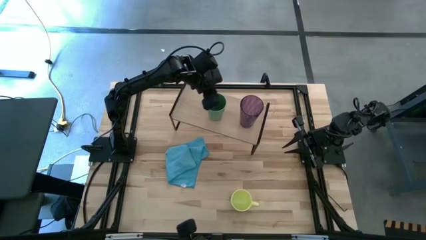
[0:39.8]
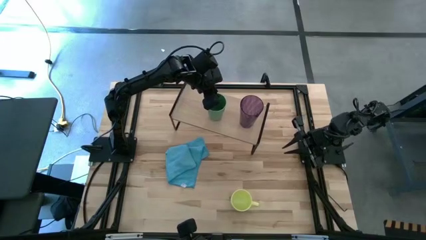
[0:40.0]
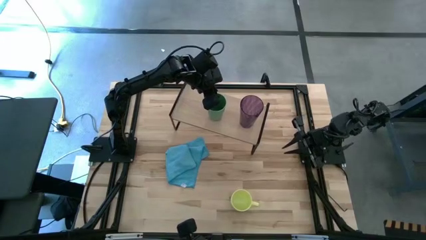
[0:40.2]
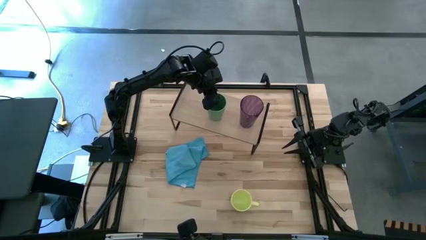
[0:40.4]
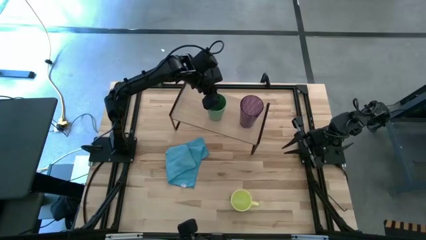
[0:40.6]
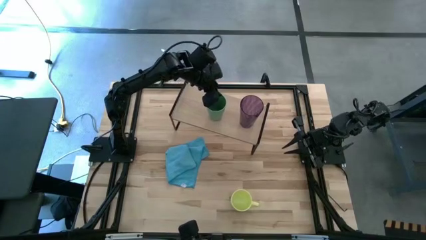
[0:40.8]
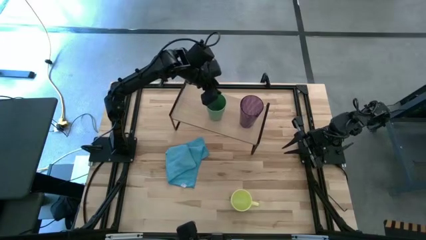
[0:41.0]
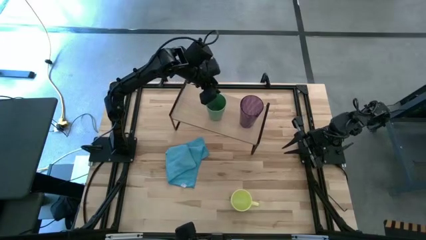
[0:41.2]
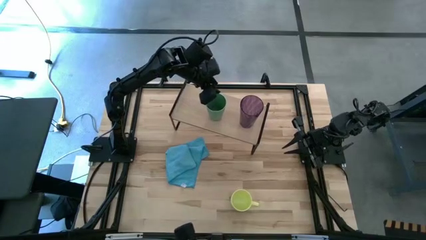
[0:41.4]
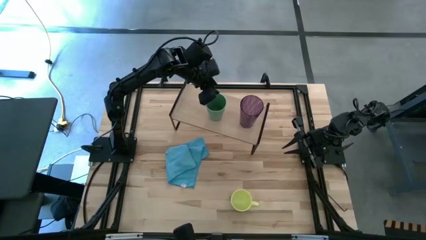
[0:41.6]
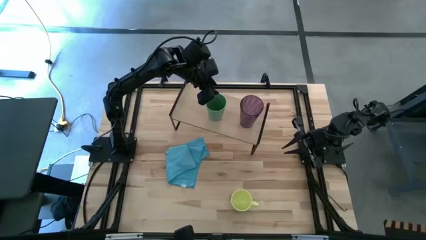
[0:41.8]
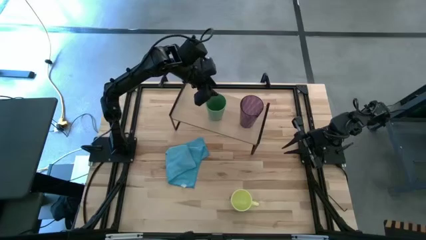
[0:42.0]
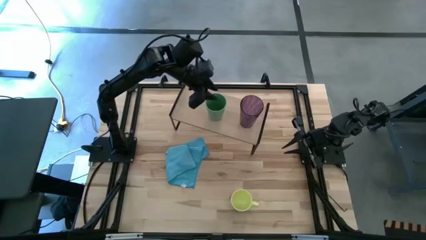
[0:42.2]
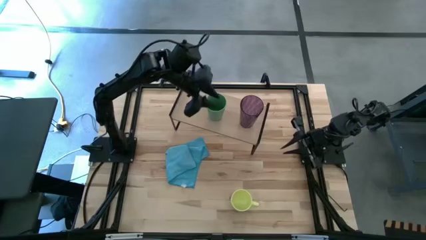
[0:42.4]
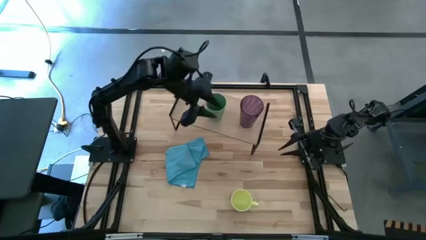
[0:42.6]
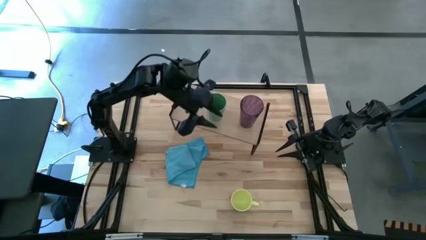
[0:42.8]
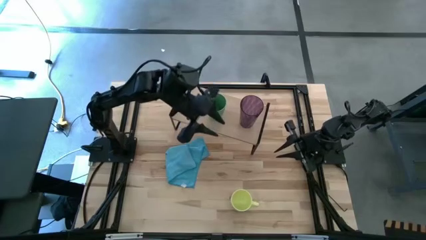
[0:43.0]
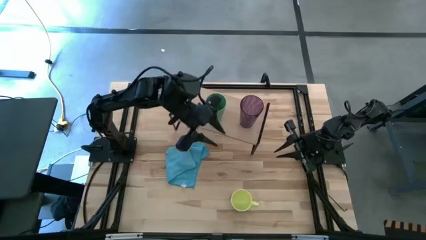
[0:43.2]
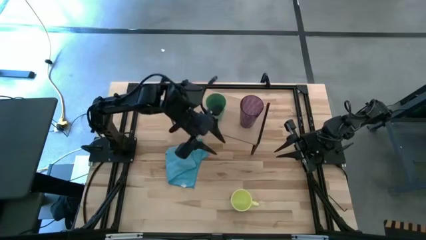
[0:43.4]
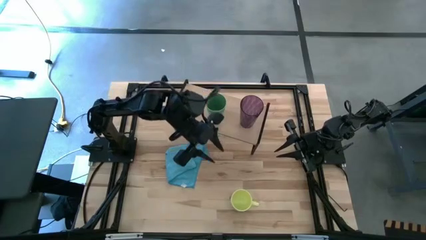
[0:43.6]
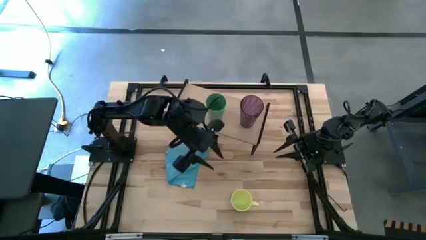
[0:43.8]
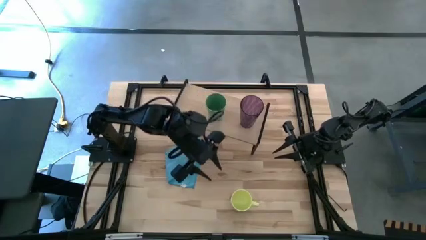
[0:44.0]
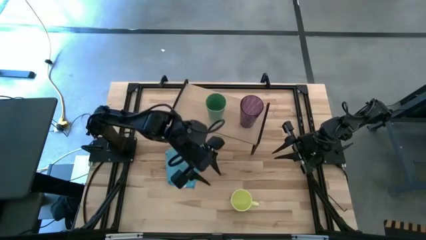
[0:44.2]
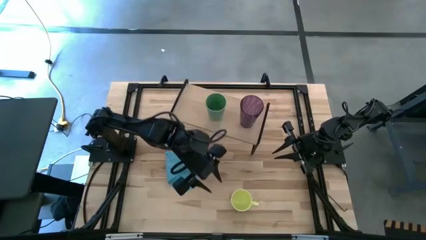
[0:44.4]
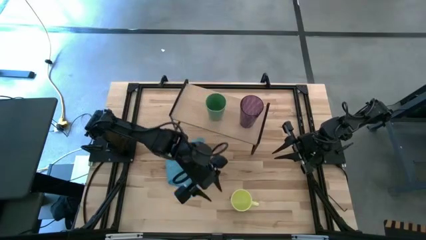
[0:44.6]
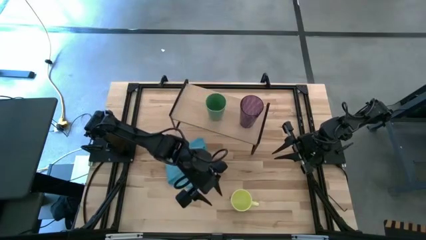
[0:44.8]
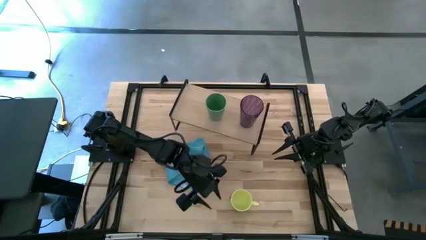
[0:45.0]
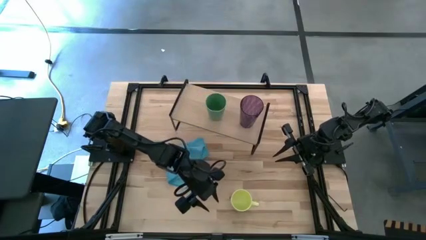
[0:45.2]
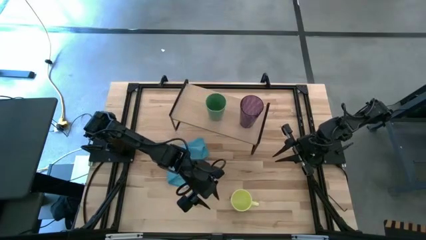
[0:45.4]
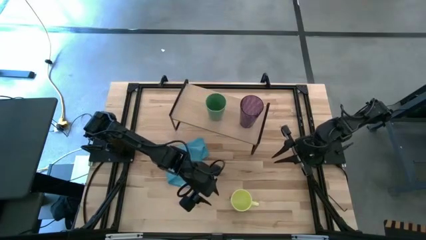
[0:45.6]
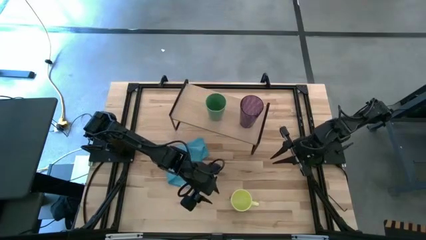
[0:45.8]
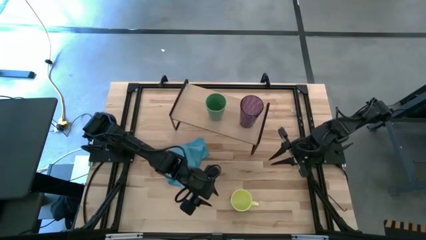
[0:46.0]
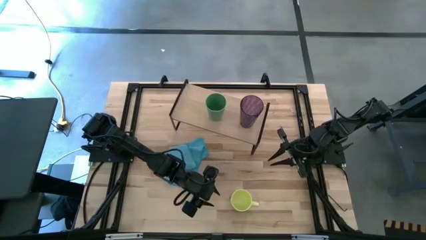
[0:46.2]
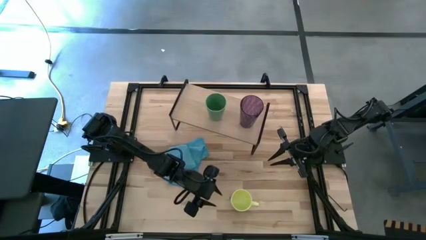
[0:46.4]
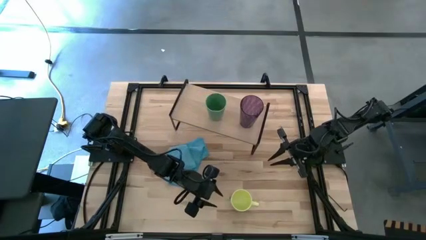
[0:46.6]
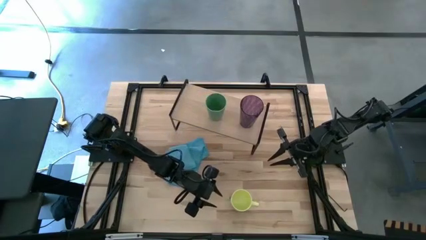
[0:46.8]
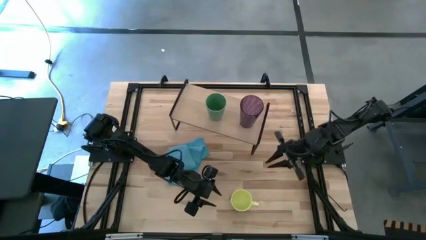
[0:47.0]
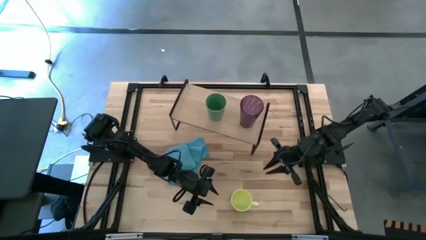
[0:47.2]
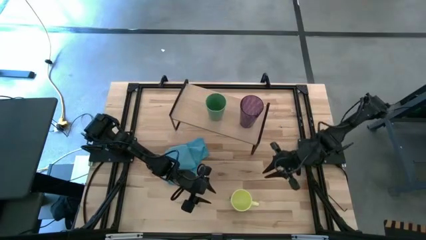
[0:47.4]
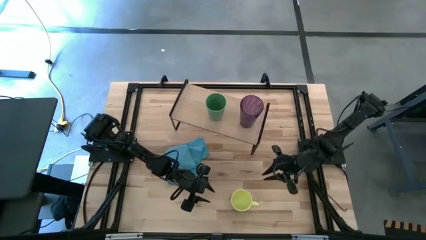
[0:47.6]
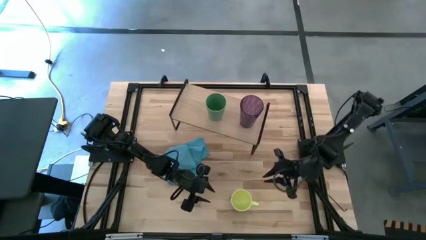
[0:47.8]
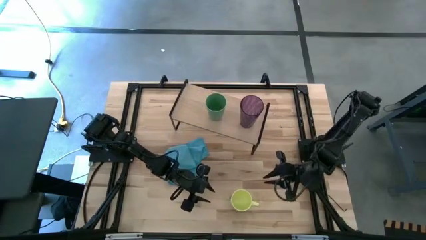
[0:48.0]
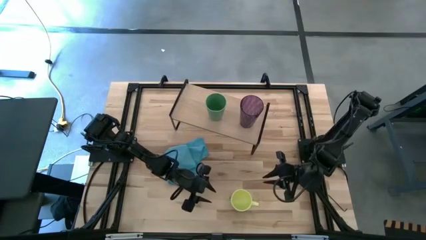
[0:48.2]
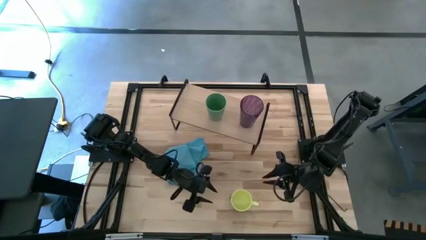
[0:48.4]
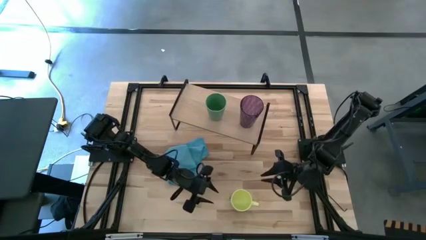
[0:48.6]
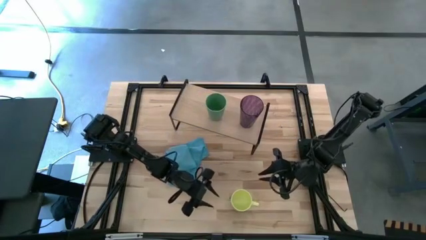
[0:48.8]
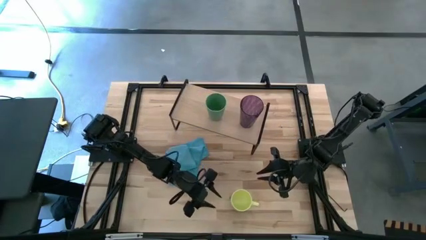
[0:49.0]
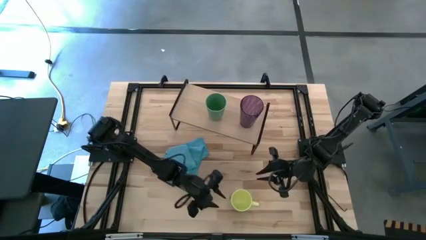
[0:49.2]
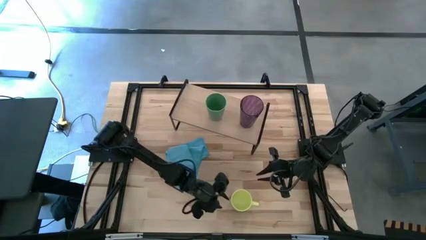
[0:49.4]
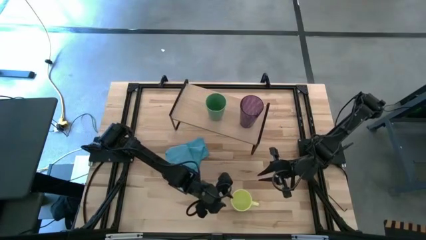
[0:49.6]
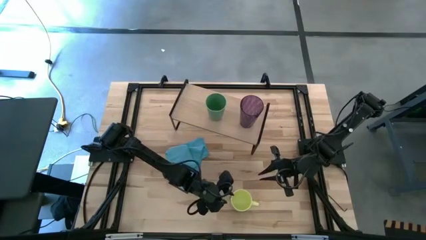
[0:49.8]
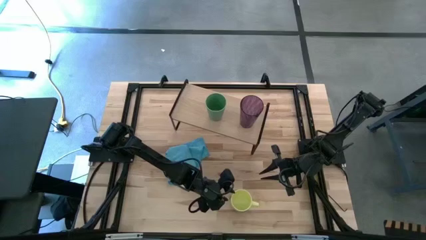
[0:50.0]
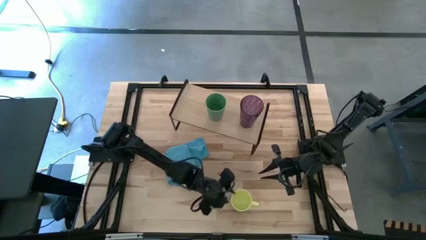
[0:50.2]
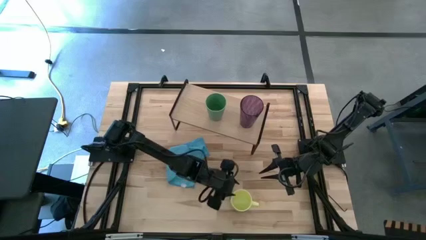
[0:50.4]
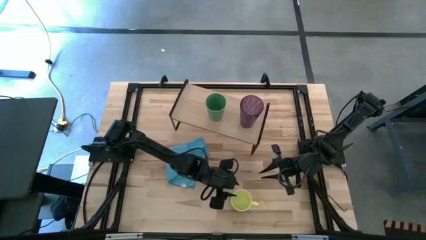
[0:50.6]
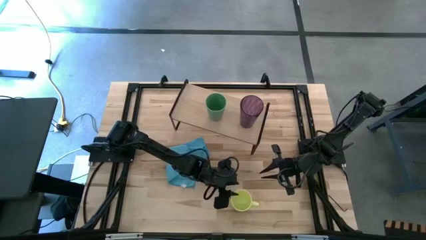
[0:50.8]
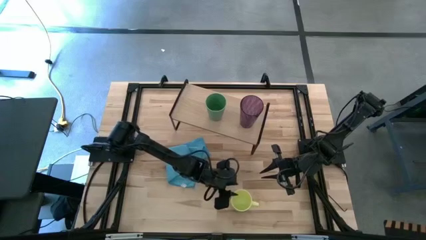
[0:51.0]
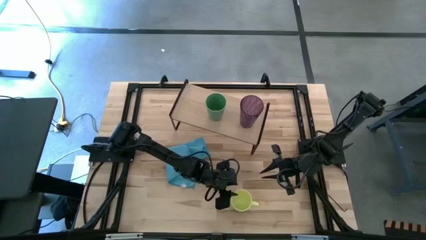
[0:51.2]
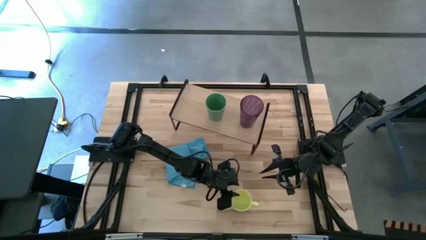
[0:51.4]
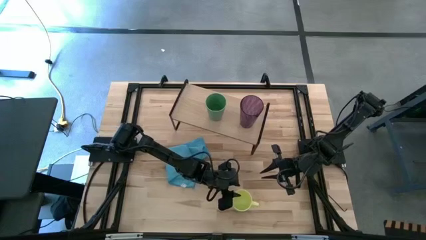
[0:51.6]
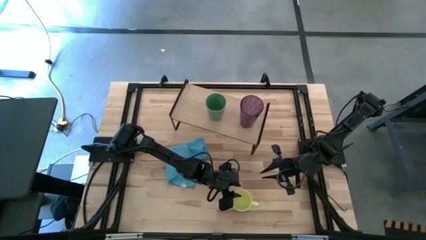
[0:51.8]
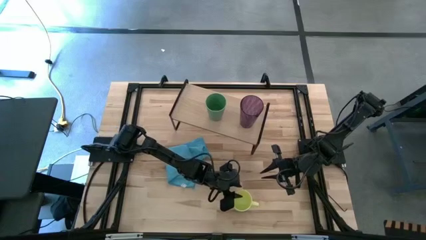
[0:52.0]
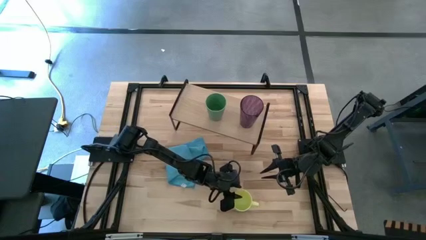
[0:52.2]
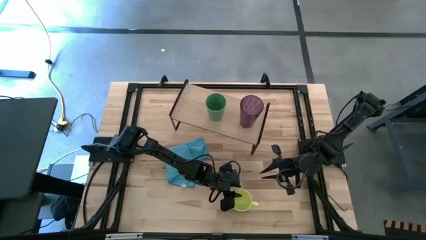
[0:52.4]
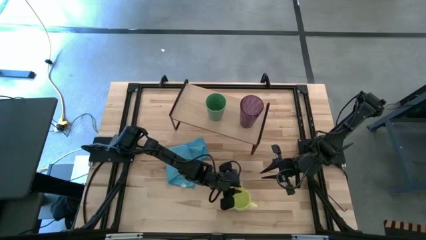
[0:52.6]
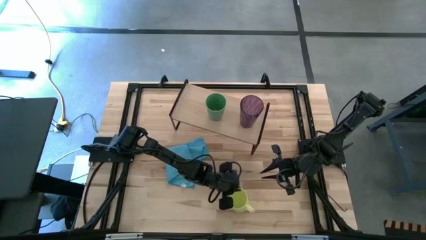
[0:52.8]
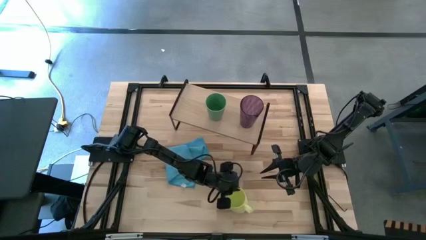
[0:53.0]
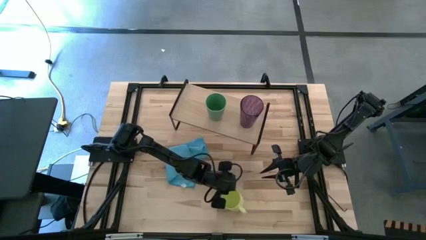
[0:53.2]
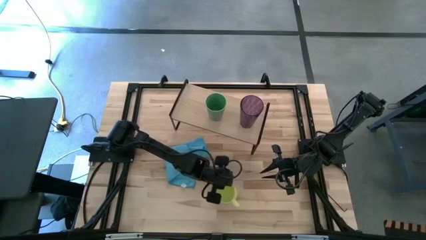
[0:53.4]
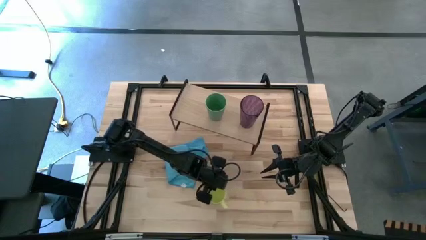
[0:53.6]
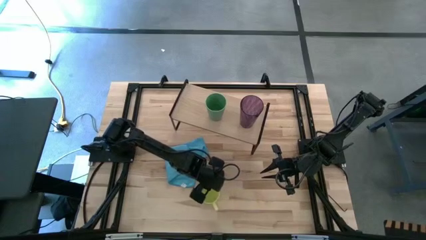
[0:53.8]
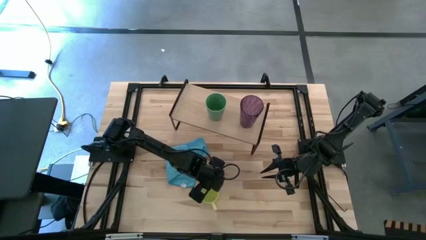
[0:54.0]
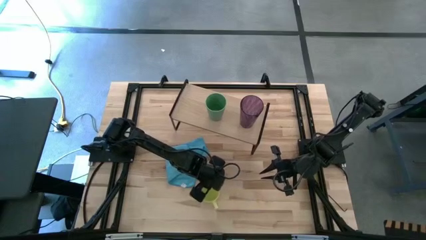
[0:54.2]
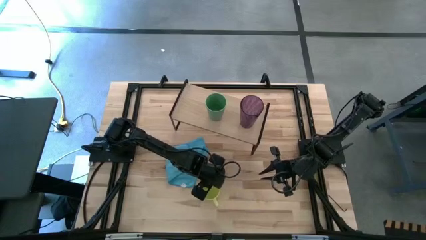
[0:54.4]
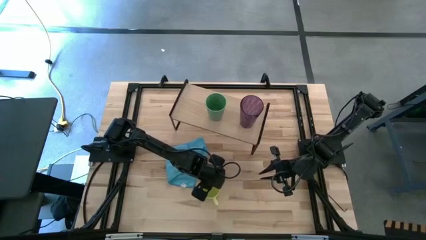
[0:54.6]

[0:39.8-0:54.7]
Task: Stack small to large cups/mugs on shelf
Put the yellow mug on the shelf
